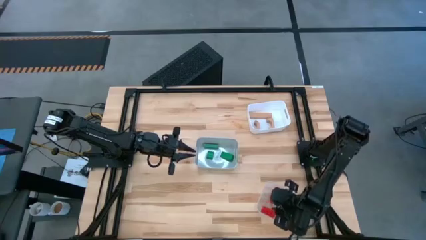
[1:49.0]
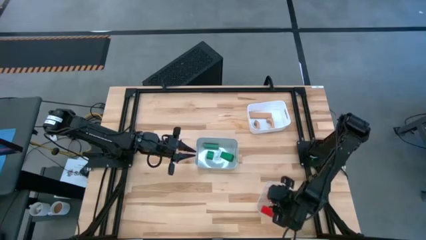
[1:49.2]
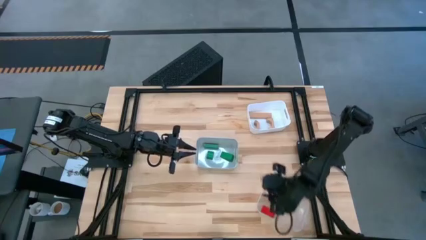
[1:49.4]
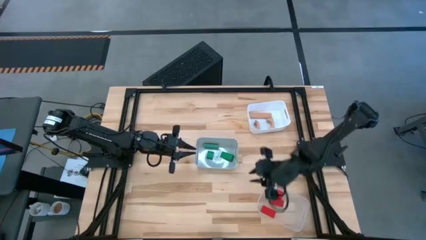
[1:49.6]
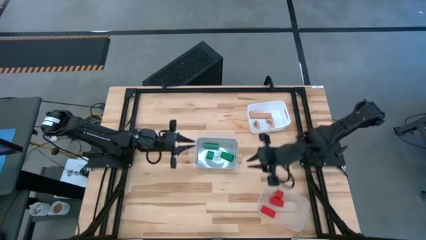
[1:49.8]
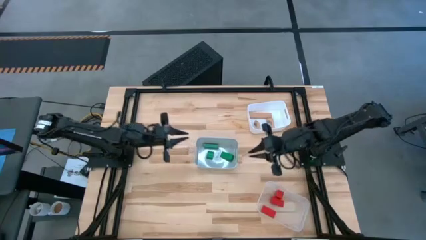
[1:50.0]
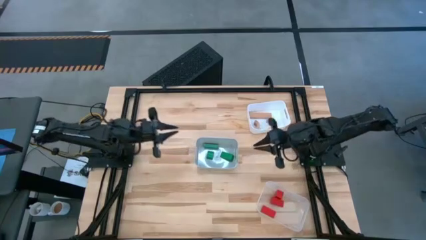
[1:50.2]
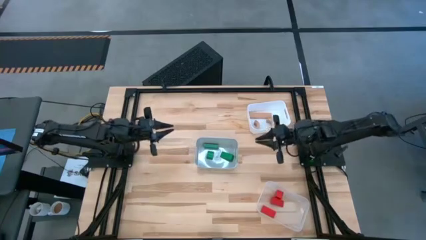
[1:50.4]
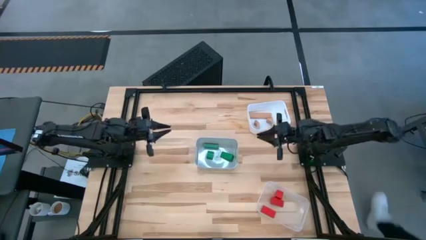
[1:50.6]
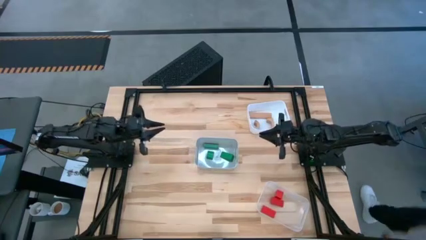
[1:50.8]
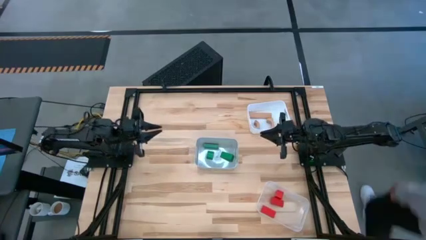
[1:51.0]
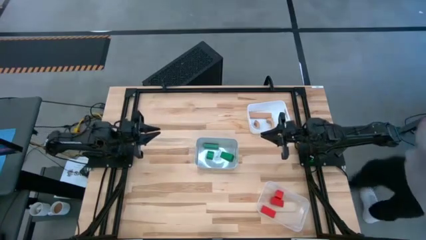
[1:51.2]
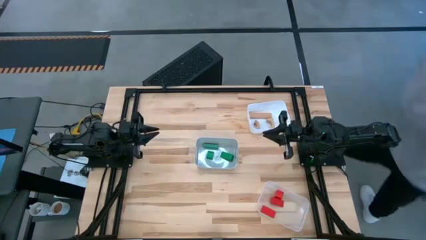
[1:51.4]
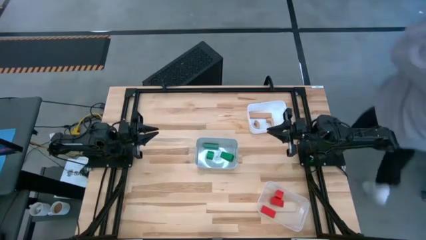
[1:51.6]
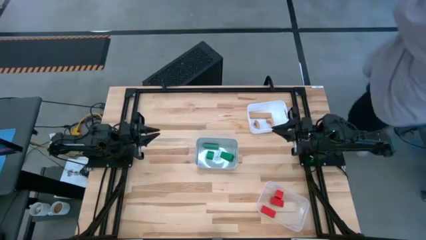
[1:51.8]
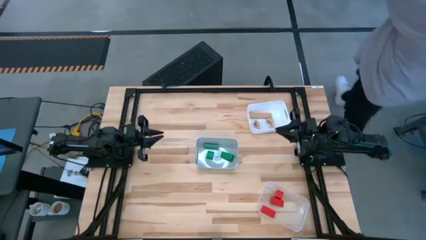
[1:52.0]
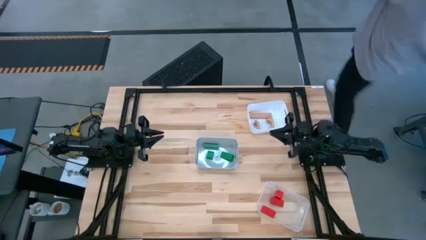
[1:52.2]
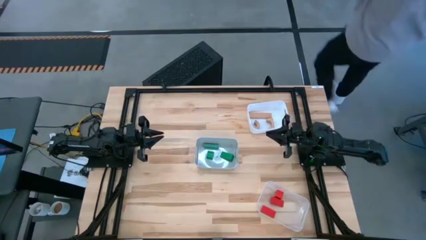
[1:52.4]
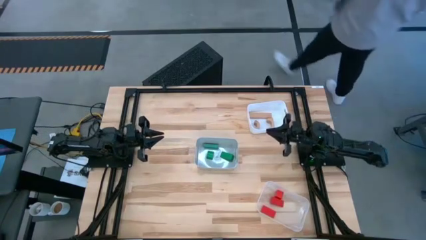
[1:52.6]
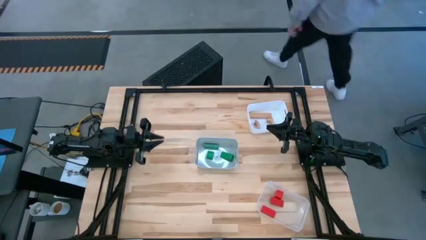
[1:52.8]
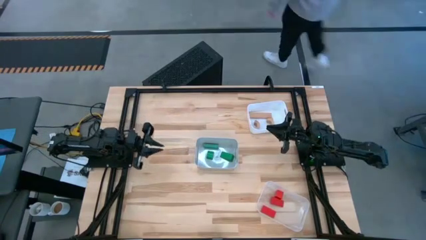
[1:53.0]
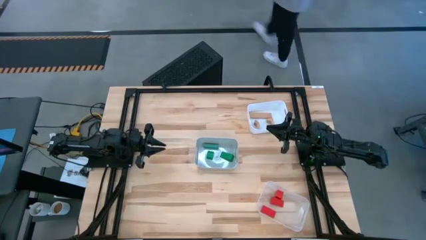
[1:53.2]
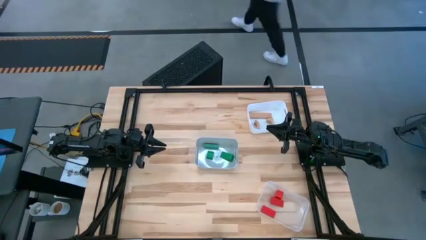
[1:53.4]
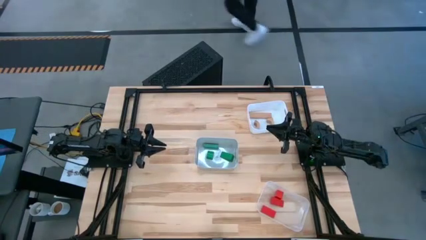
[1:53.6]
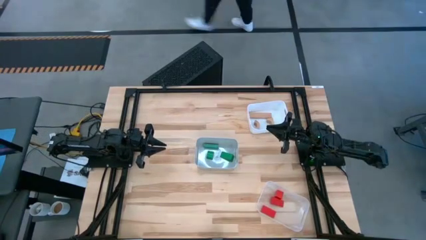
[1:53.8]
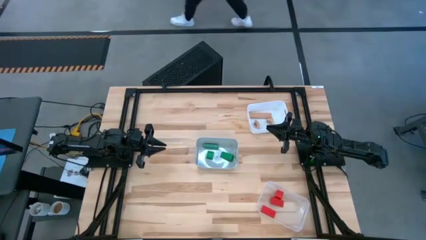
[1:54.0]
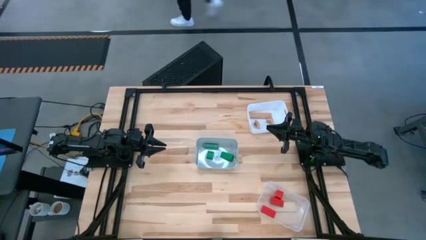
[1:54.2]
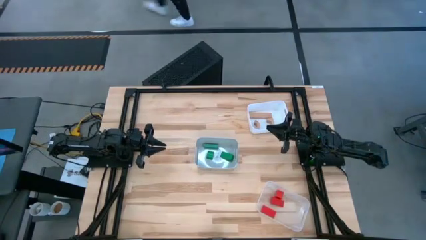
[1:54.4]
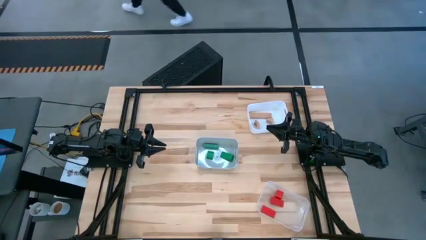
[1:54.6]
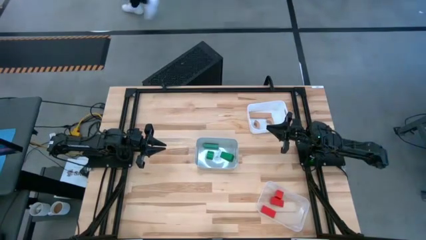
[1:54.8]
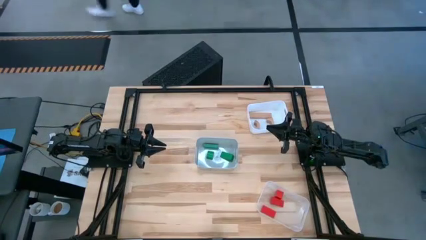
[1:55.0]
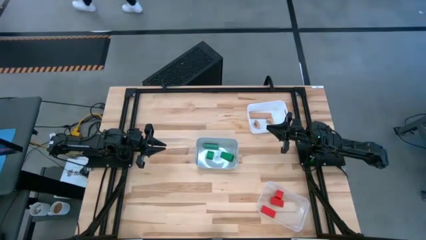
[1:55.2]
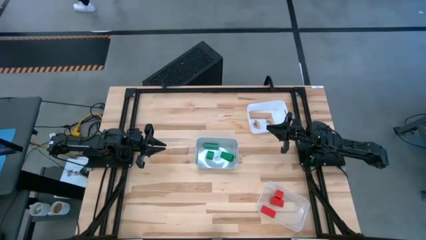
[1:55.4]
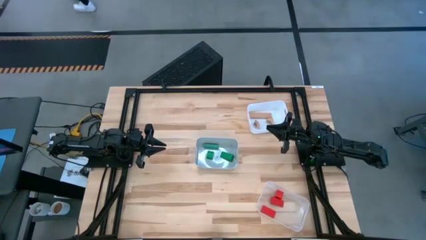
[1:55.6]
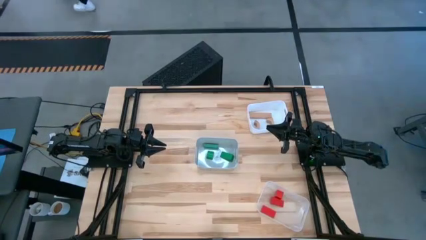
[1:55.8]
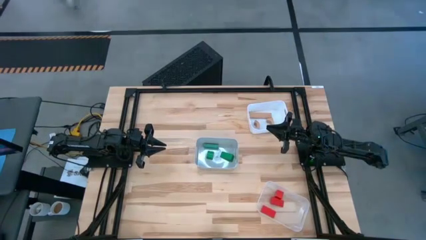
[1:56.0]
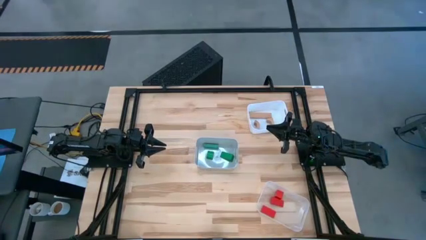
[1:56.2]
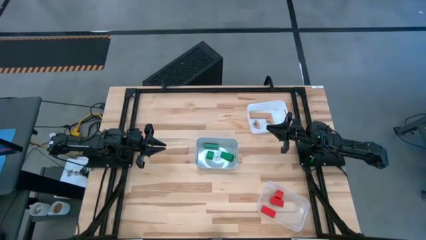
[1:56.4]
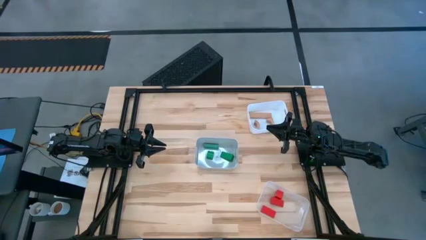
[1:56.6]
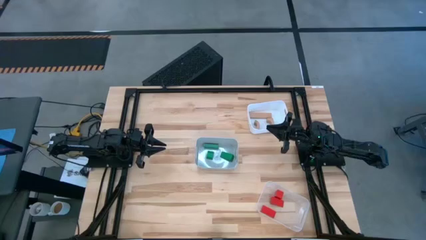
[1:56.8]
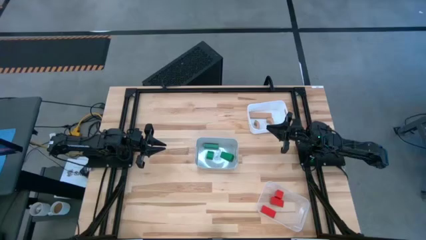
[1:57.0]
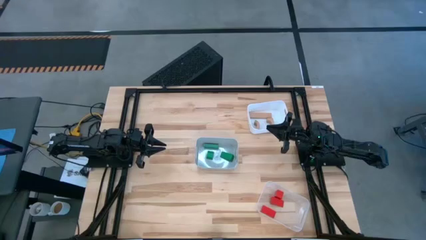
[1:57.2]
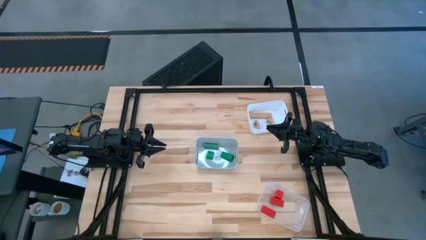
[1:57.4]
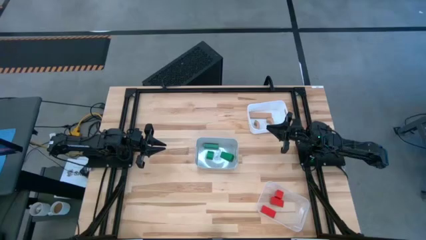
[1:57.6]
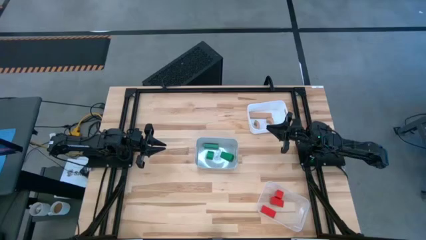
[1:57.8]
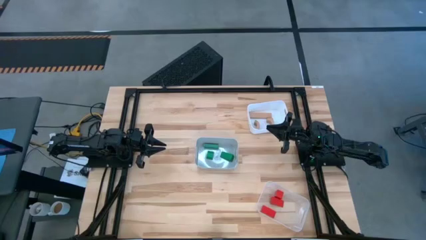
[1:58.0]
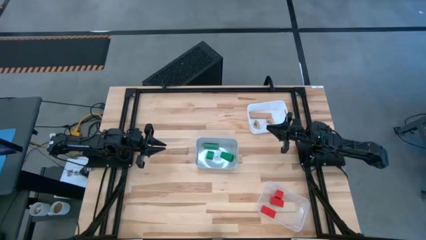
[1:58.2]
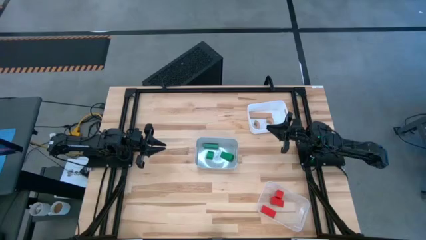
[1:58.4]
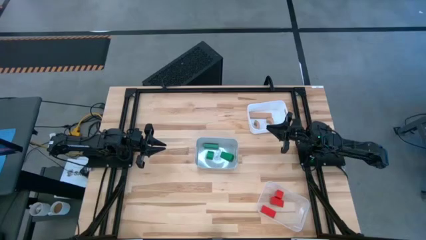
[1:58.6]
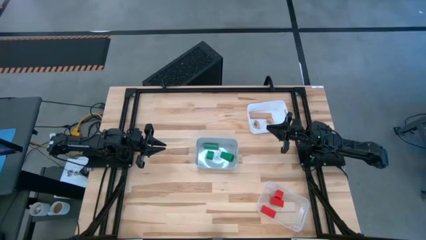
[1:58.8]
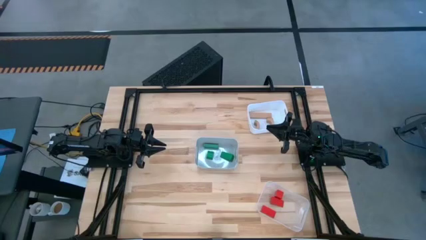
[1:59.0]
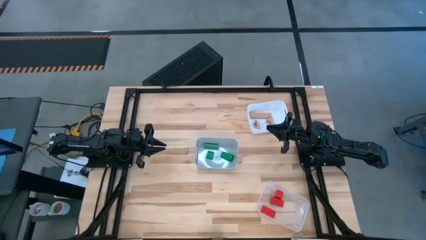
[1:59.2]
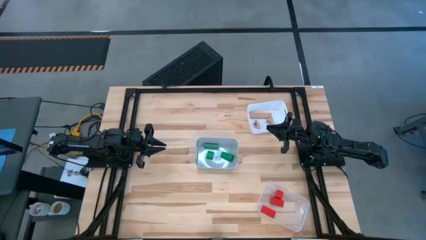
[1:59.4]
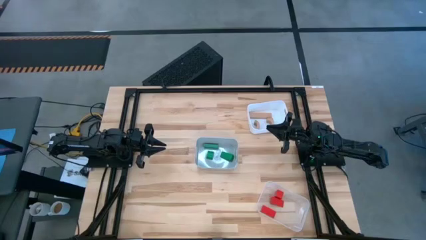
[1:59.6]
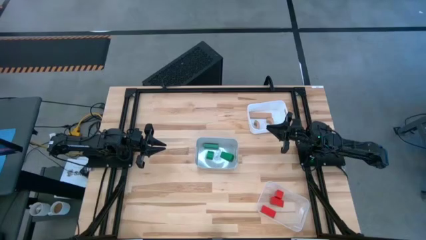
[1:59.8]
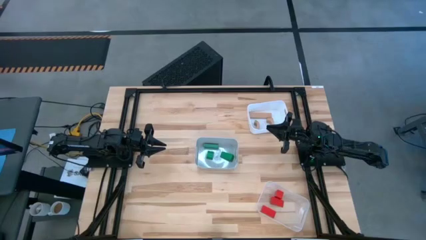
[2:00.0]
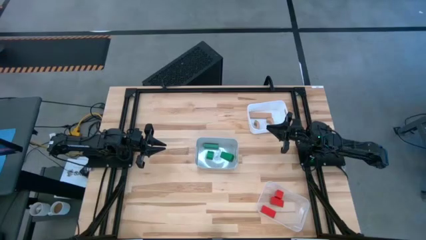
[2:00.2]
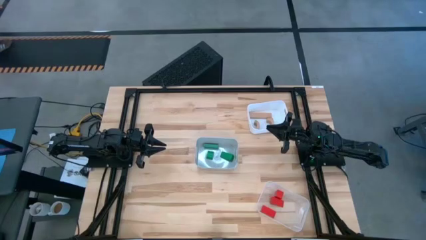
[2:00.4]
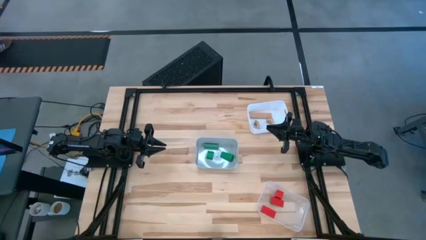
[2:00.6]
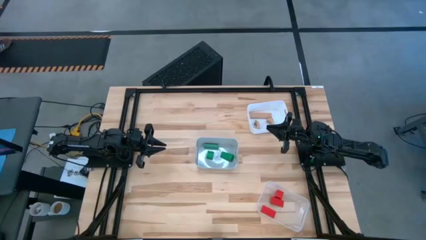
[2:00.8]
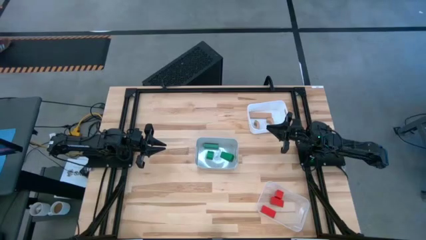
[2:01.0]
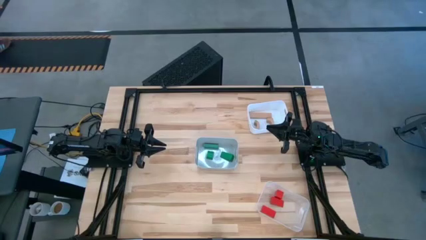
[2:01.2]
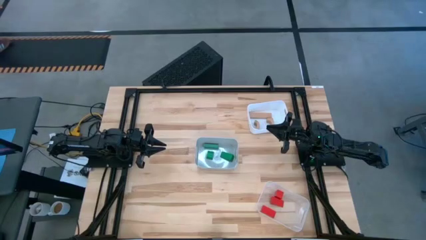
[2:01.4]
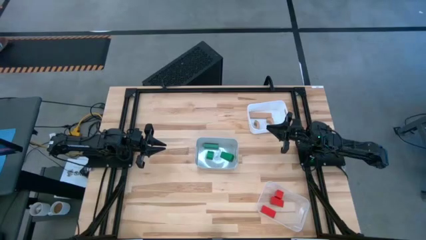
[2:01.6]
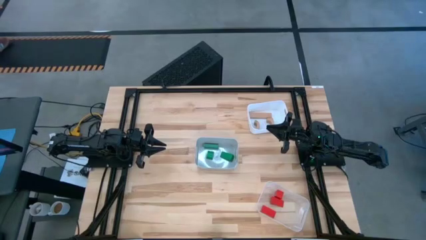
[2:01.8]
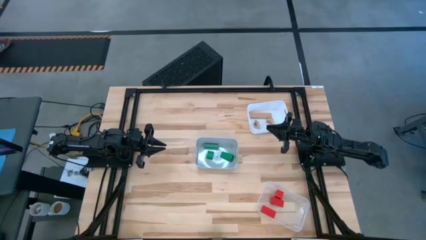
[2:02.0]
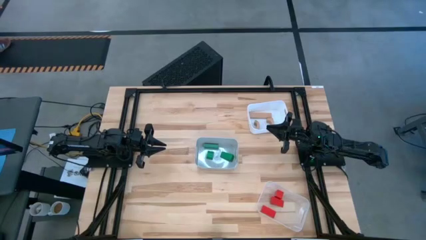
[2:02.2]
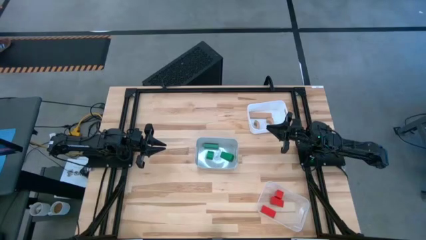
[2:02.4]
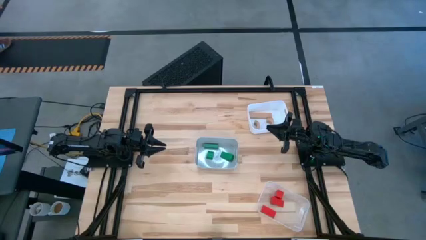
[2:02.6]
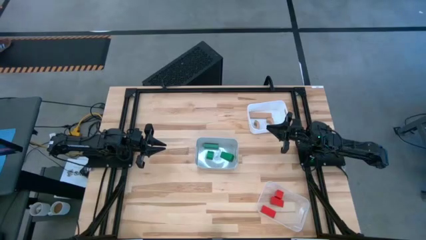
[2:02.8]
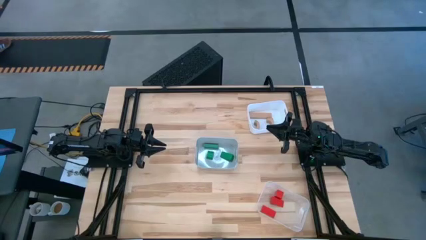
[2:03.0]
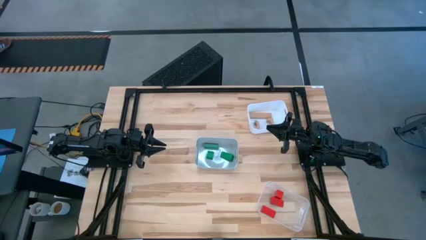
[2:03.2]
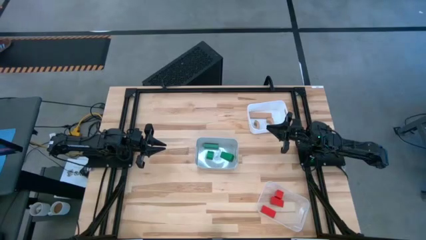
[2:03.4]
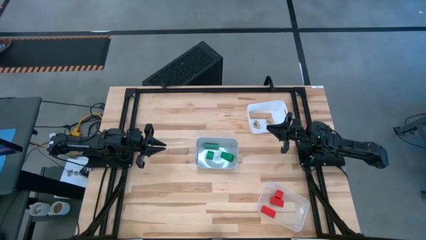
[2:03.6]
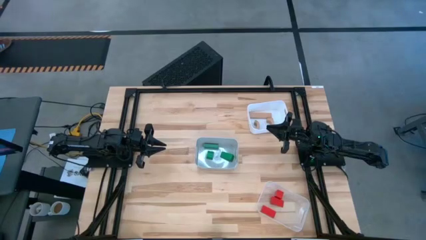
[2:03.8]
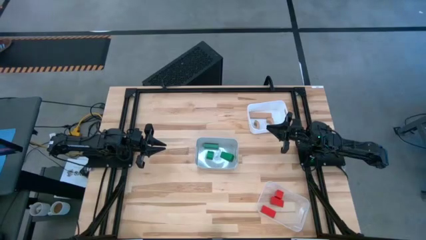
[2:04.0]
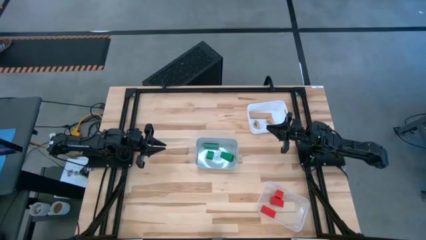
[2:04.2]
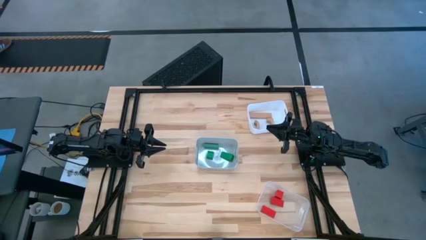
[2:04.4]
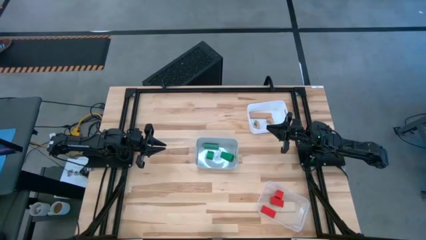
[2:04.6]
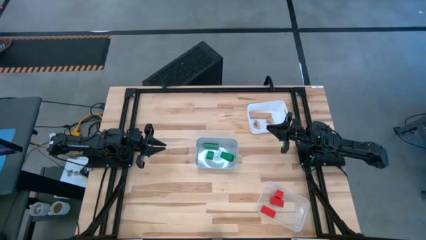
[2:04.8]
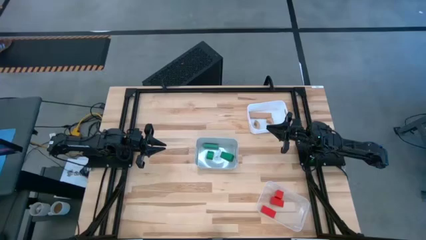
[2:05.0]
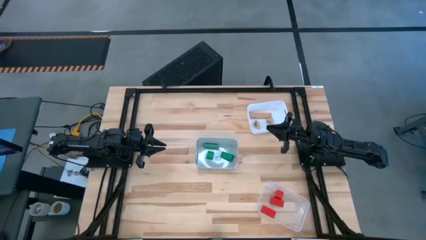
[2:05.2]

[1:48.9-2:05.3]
Task: Sort & place blocks by color
Return to Home Position

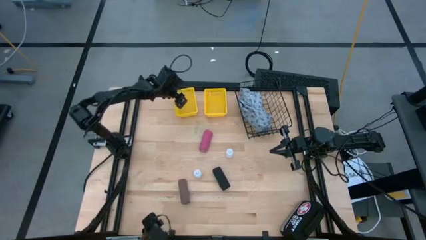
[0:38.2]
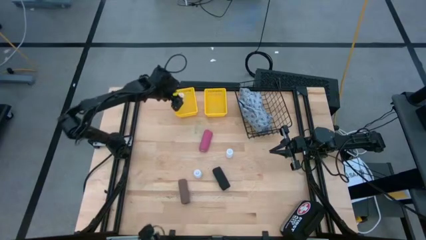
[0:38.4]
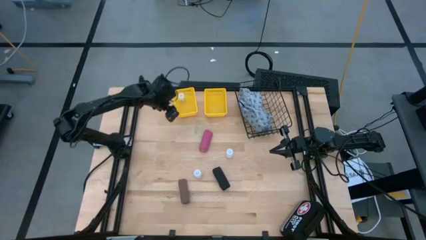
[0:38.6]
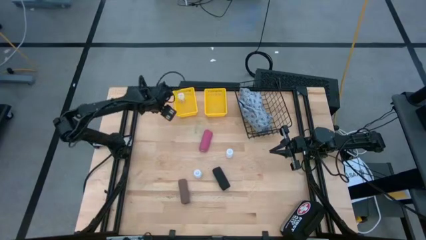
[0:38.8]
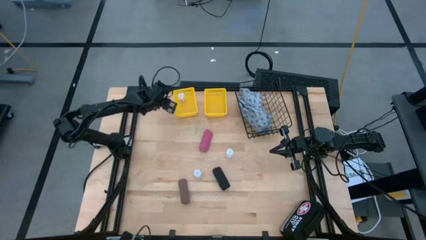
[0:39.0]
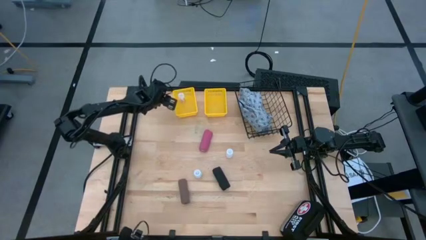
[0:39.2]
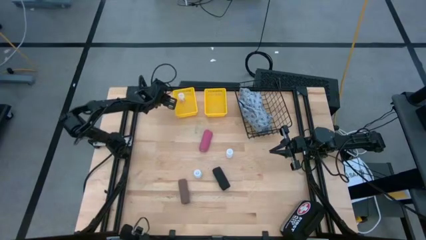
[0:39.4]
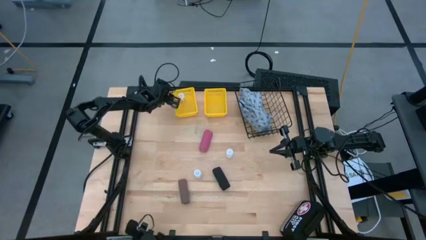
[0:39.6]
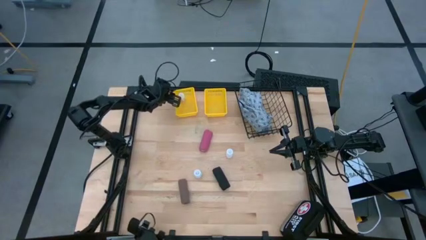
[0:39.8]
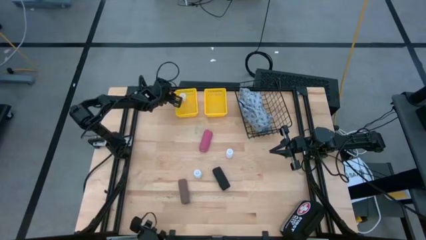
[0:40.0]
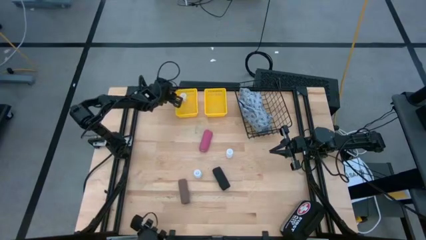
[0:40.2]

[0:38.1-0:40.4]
Task: Pick & Place Medicine items
Adjust the left yellow basket
